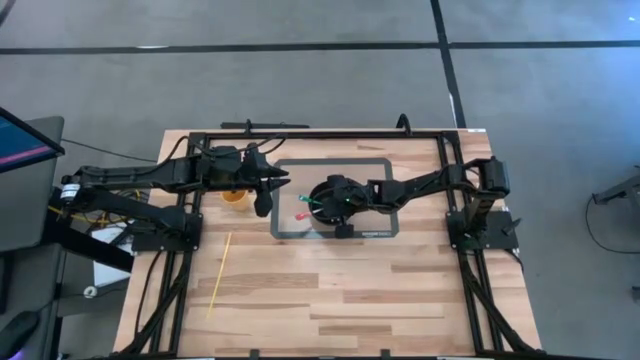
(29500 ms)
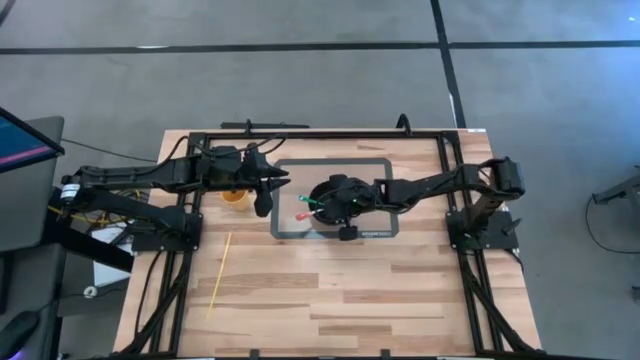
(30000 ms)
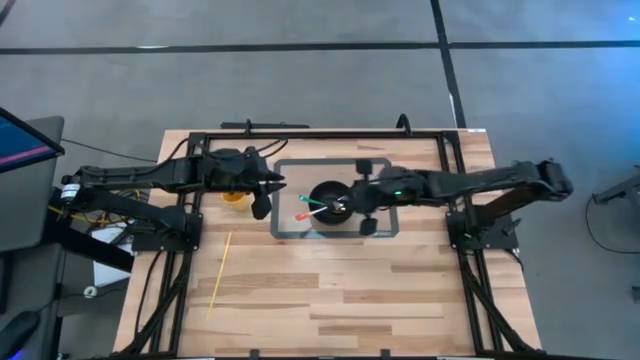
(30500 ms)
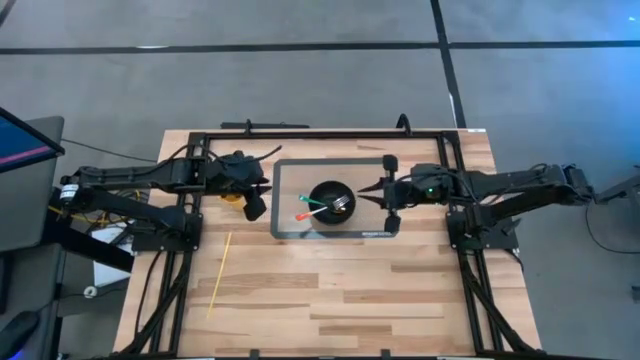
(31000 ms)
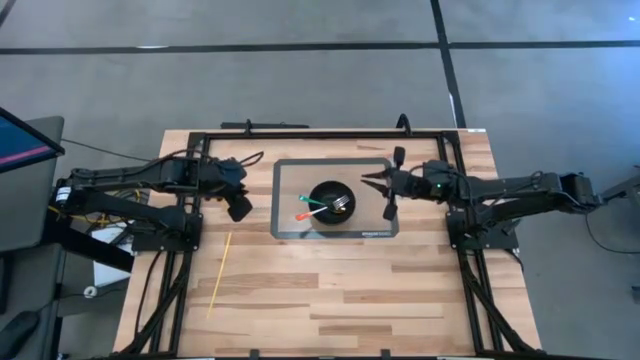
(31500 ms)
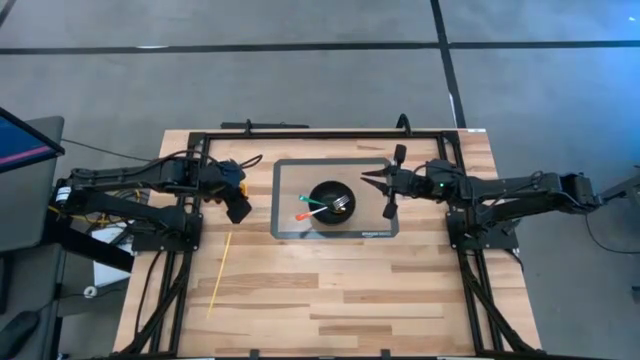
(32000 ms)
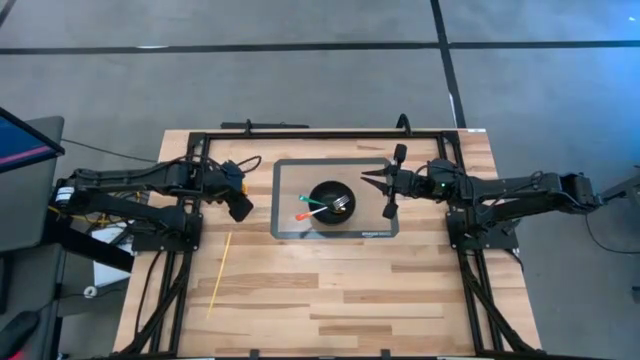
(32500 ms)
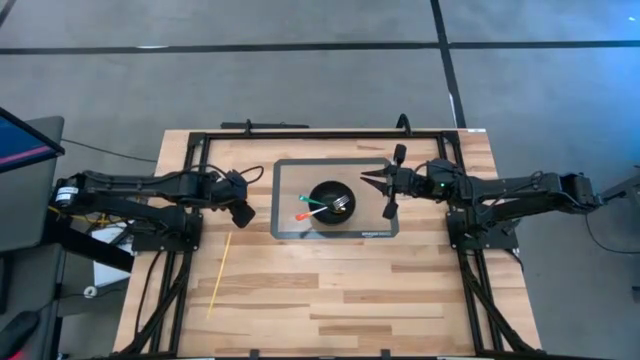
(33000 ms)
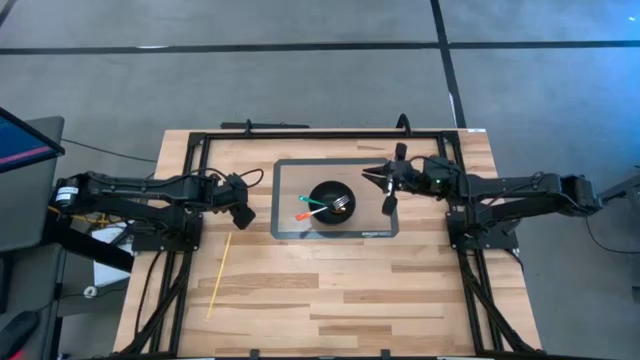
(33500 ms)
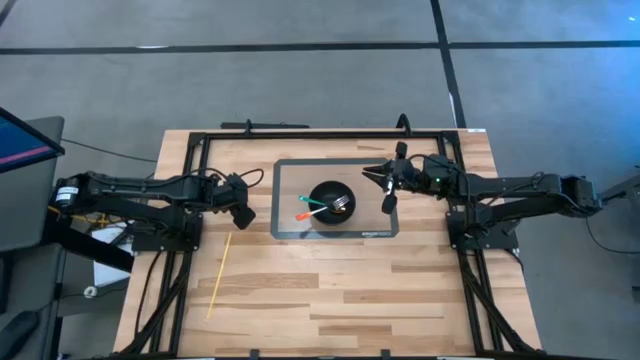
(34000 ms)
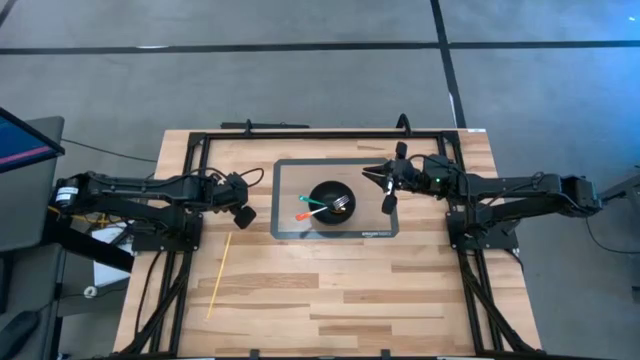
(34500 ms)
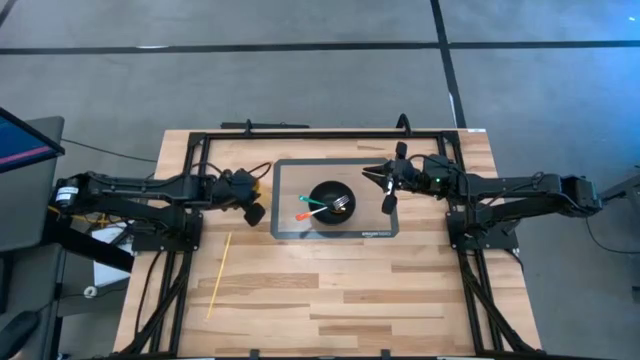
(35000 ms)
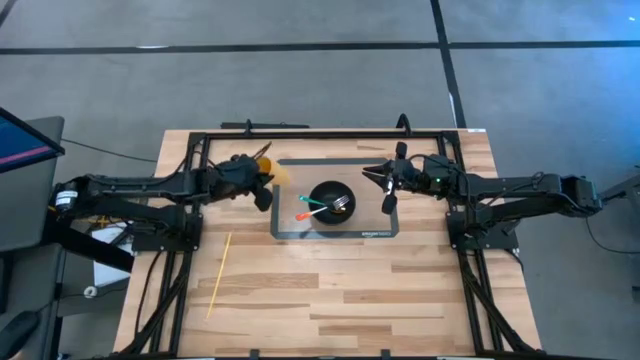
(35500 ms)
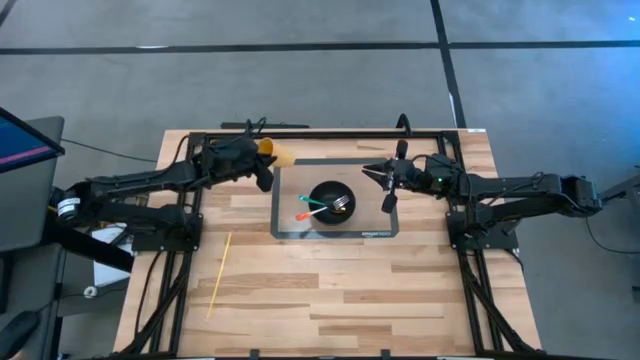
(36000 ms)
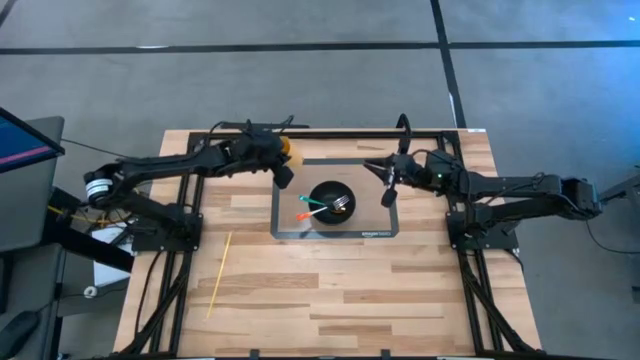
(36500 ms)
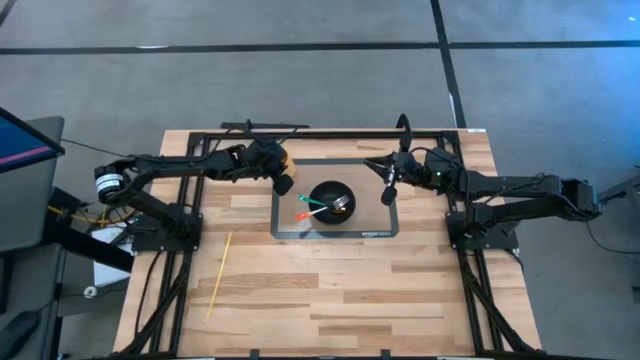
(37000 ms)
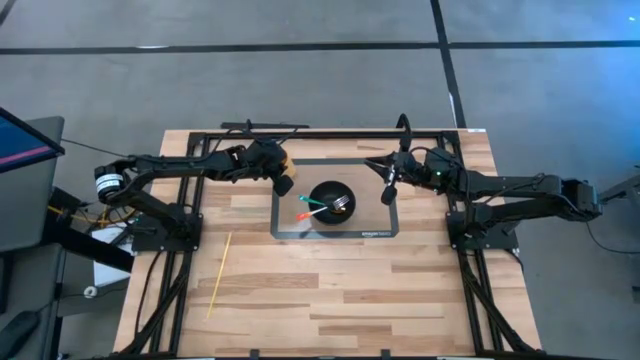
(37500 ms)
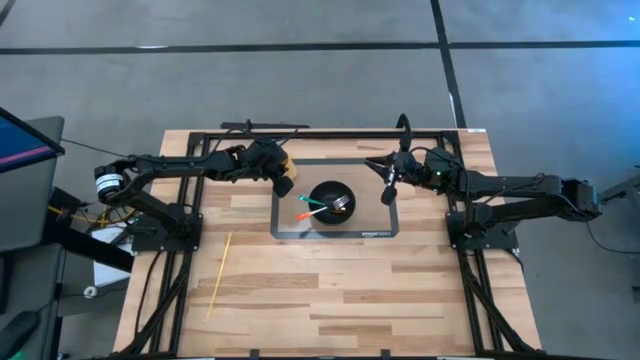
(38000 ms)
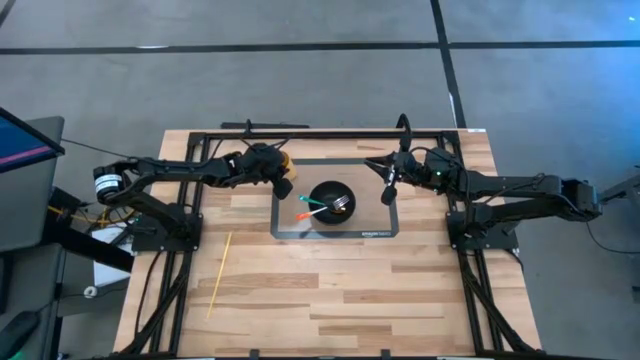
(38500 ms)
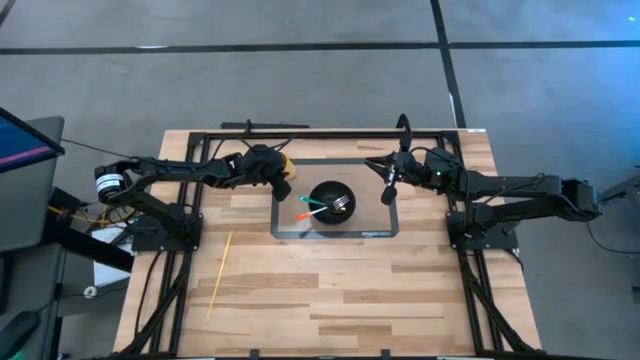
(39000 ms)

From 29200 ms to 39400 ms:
Task: Pick & Place Utensil
Put the yellow cup in the top left of the gray transparent placemat

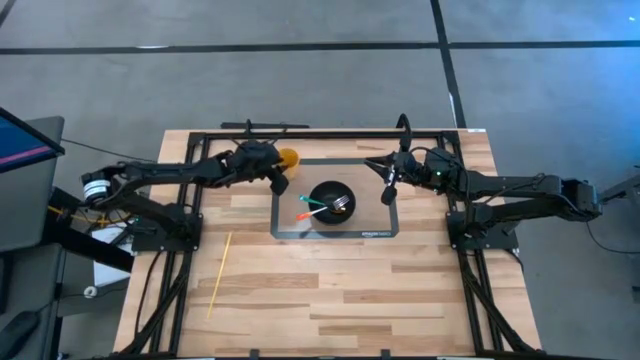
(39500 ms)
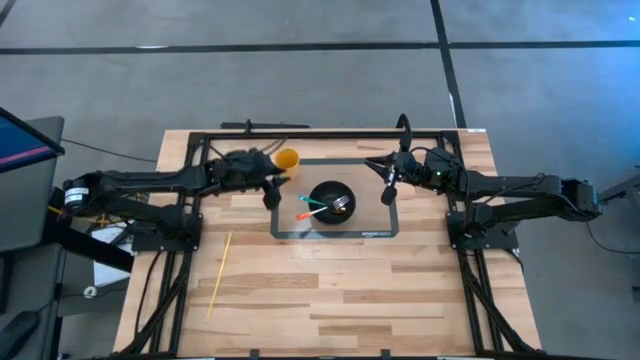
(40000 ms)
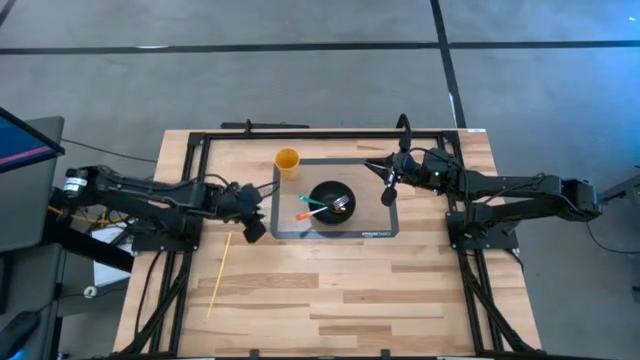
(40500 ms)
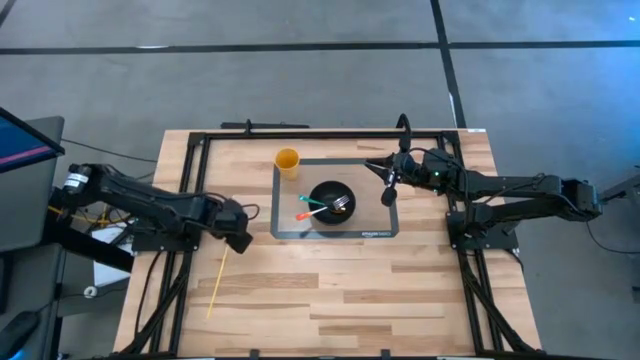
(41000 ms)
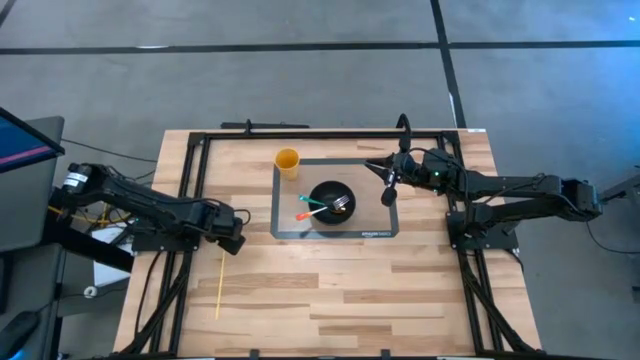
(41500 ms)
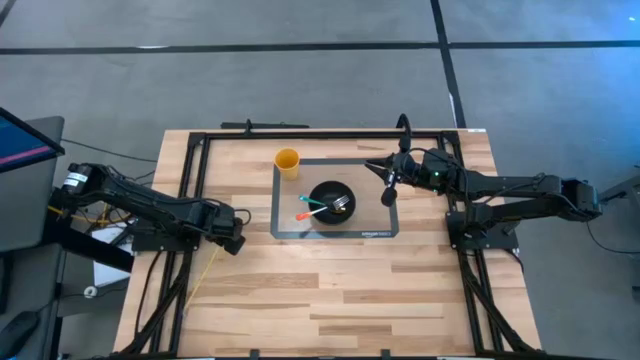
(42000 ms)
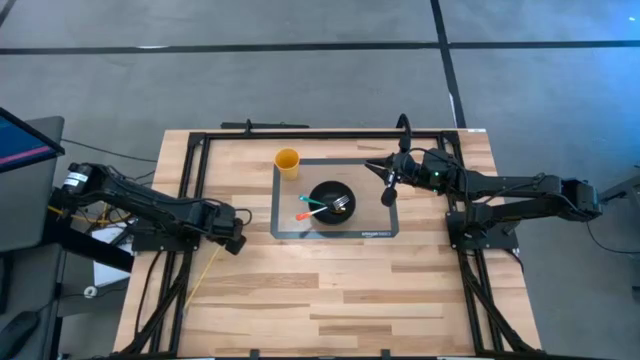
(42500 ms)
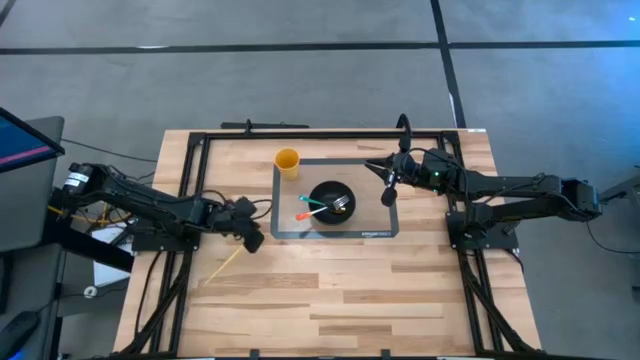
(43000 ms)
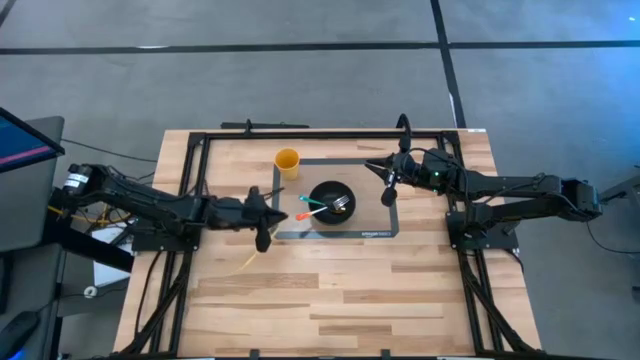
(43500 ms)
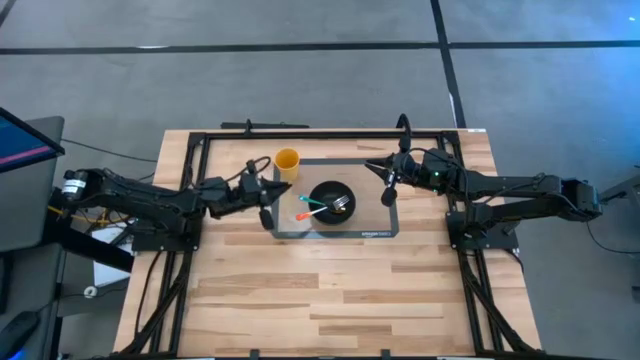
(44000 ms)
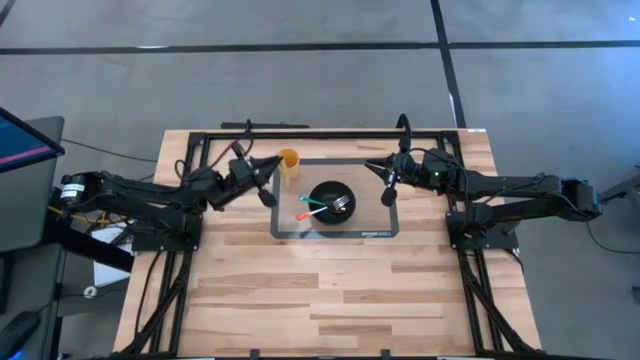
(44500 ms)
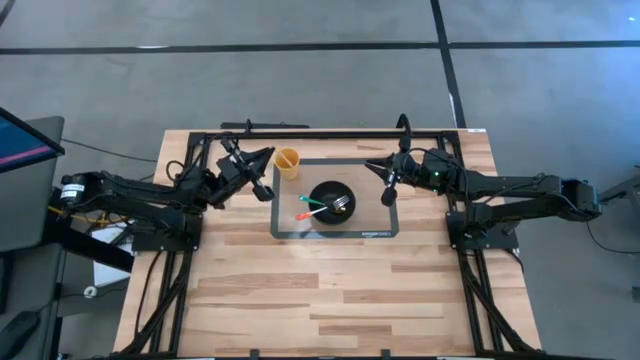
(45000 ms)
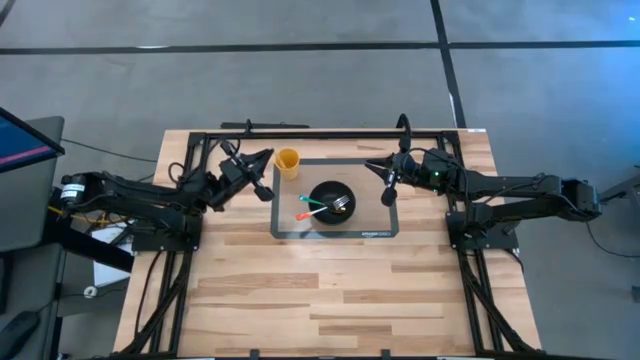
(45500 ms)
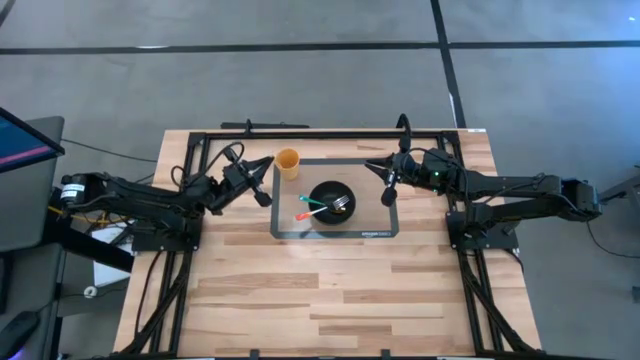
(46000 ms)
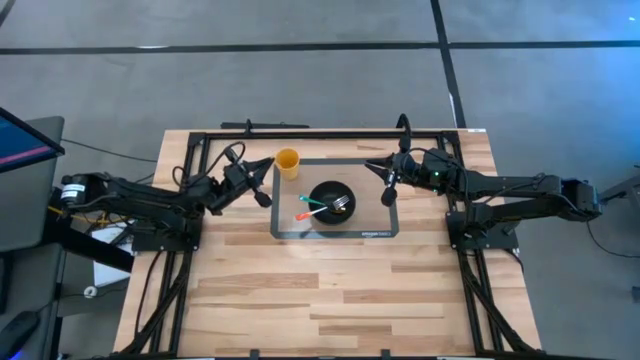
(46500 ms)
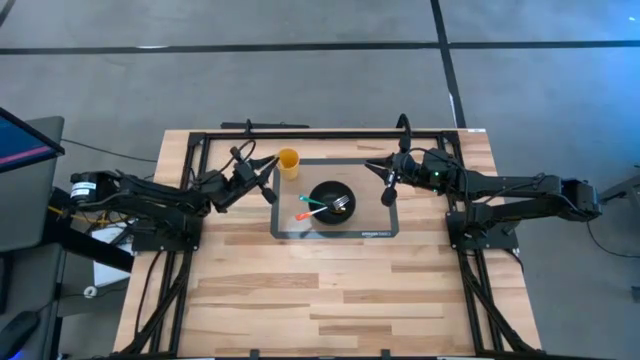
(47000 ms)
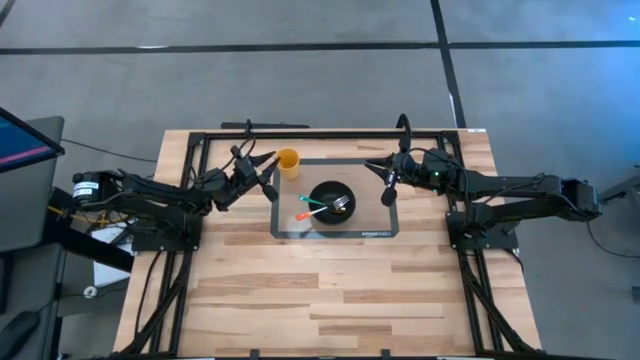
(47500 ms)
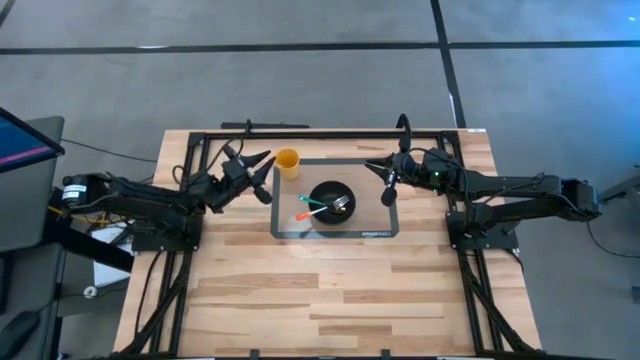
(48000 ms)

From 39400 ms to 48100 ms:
Put the yellow straw into the yellow cup

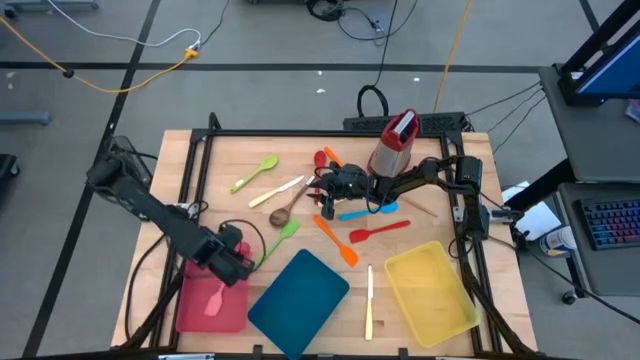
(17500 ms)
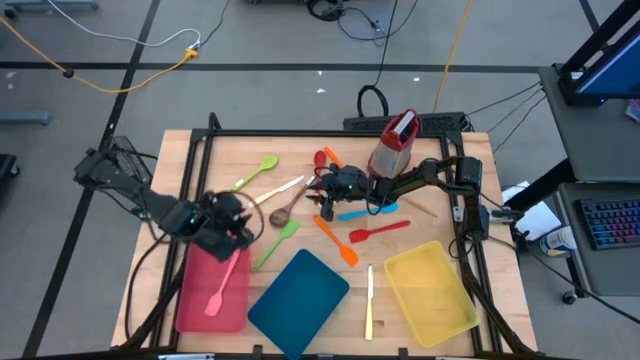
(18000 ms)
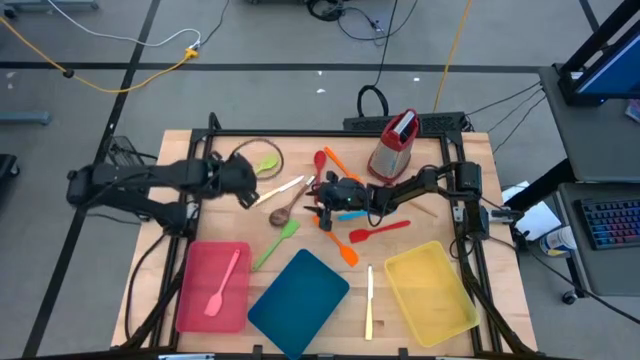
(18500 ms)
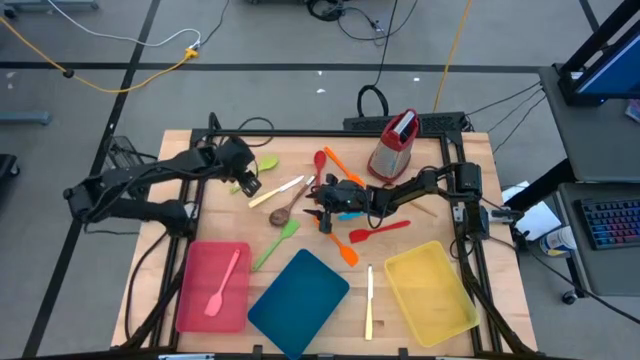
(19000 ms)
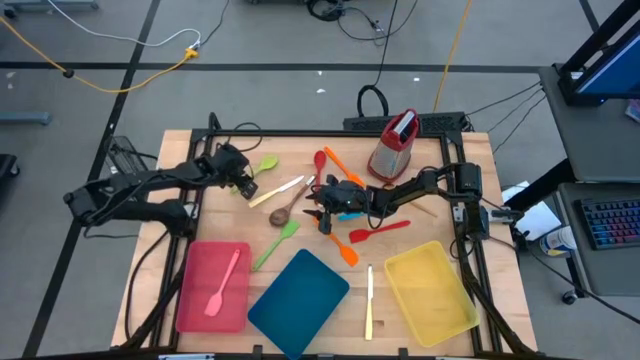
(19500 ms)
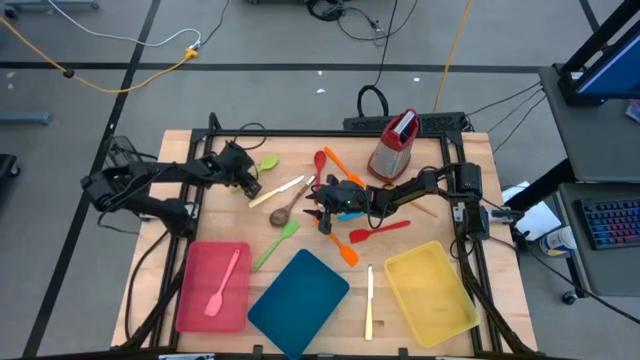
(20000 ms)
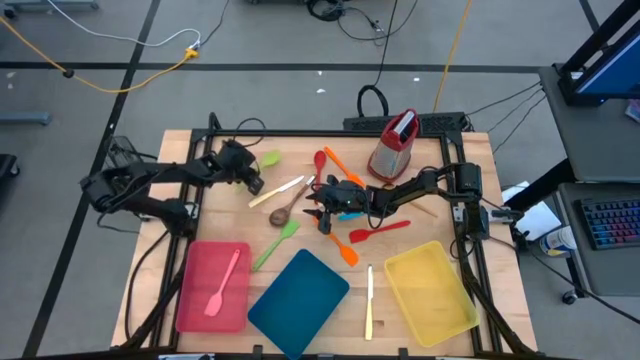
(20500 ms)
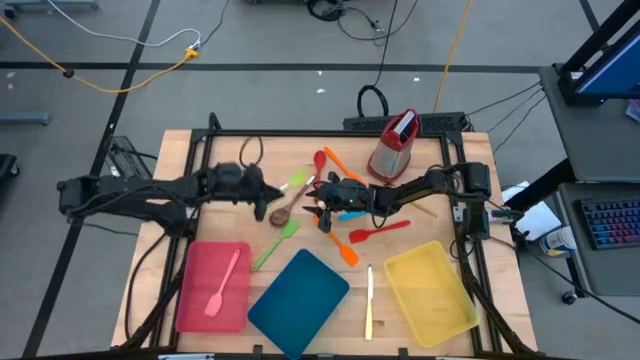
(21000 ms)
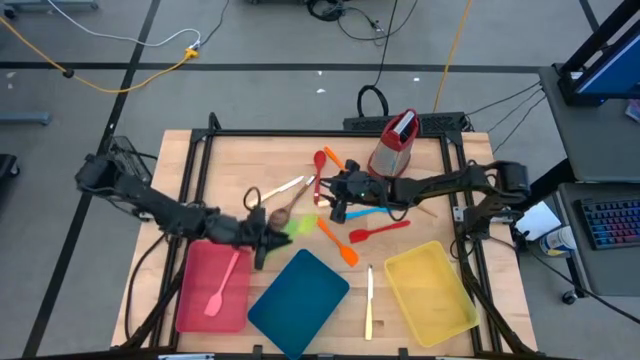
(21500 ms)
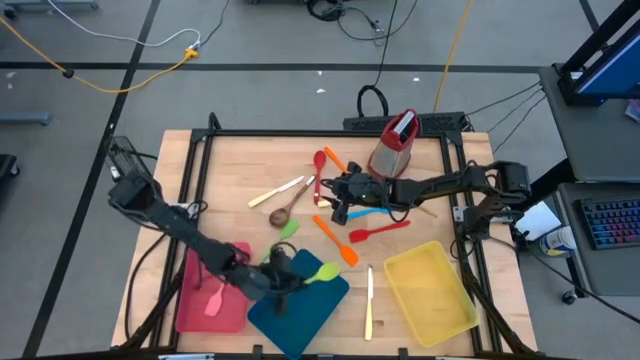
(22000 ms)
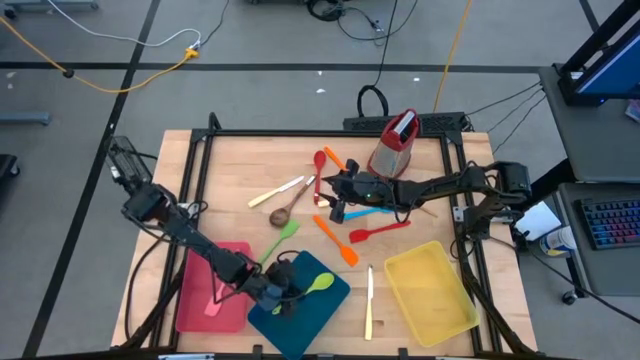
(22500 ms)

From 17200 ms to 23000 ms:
Task: Pick & Place Kitchen Items
Put the green serving spoon into blue bin
